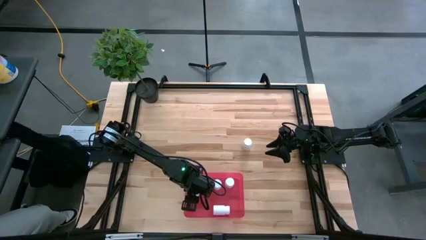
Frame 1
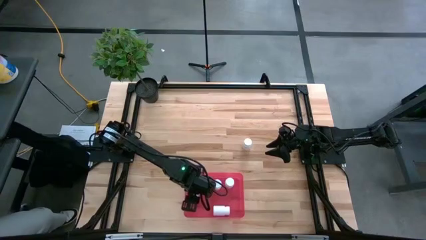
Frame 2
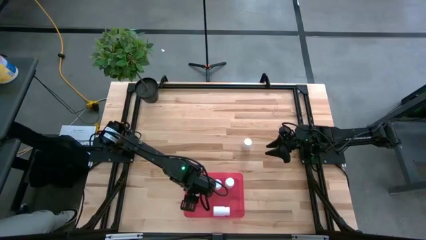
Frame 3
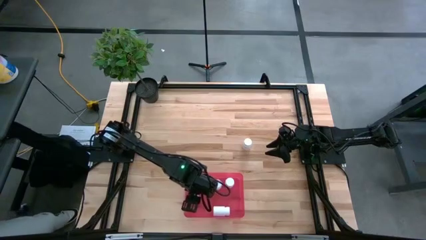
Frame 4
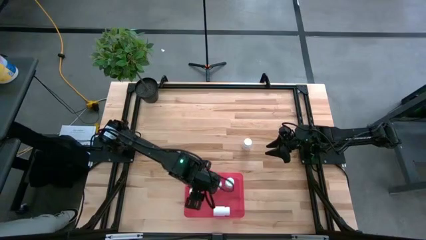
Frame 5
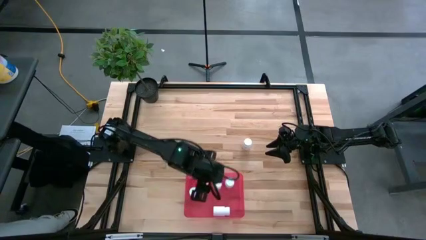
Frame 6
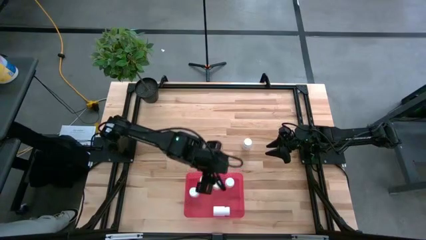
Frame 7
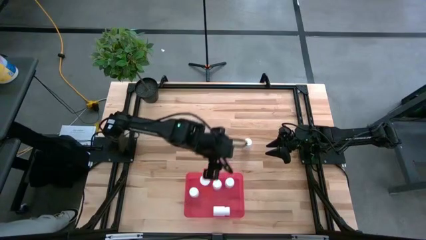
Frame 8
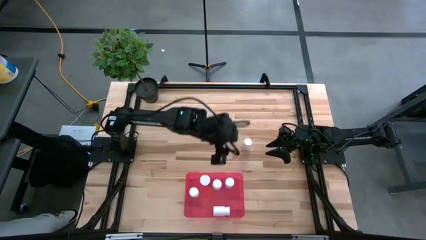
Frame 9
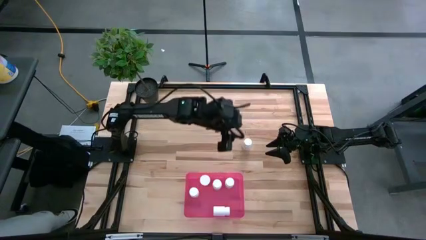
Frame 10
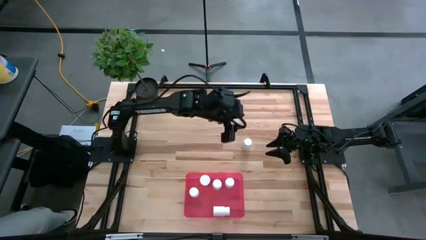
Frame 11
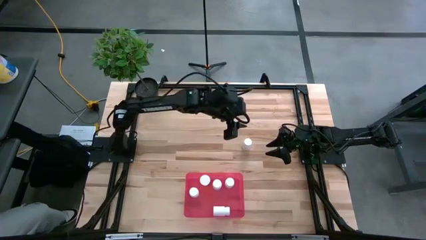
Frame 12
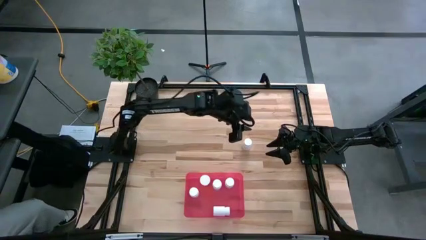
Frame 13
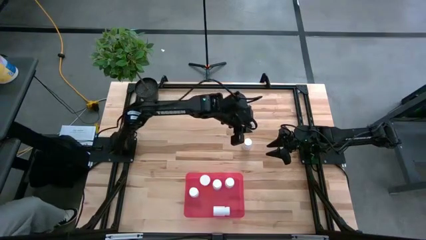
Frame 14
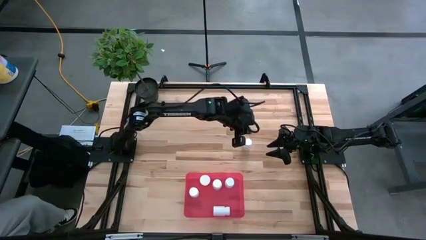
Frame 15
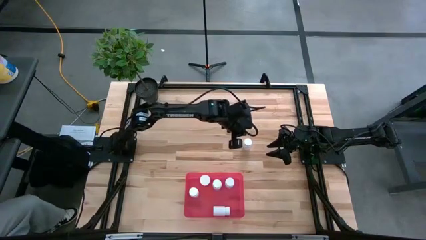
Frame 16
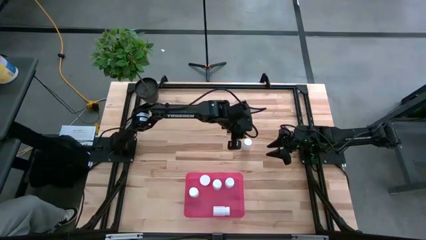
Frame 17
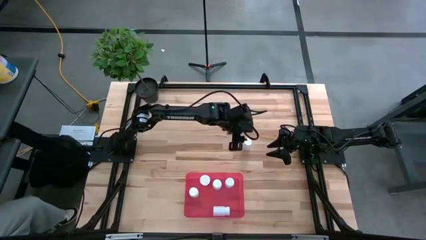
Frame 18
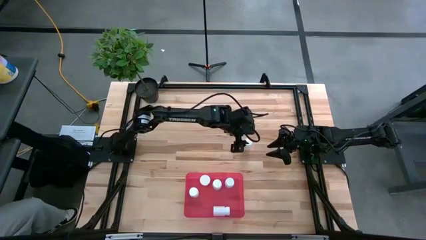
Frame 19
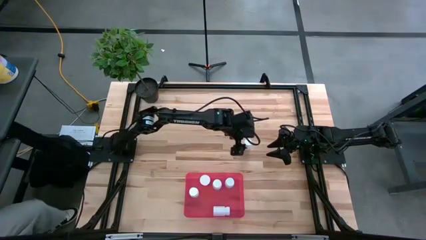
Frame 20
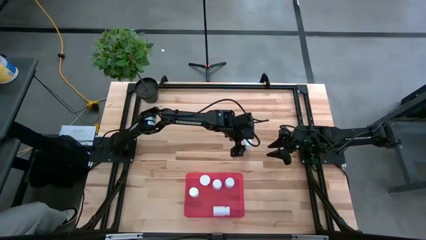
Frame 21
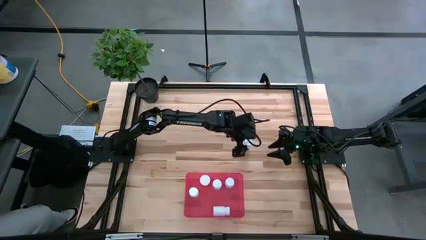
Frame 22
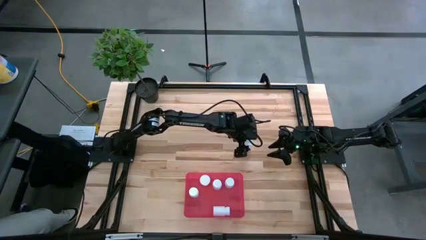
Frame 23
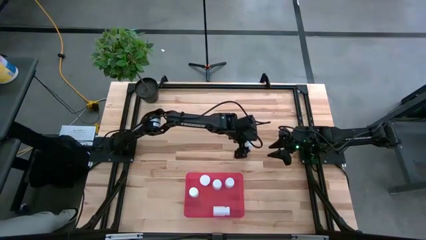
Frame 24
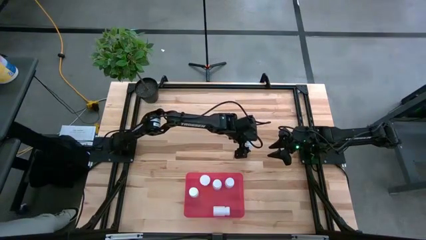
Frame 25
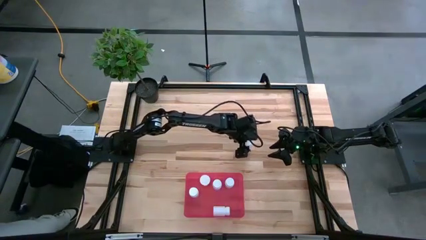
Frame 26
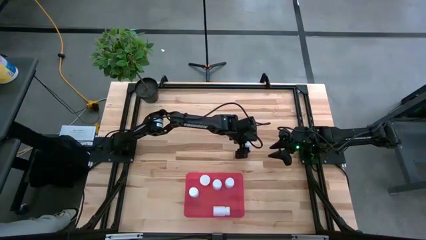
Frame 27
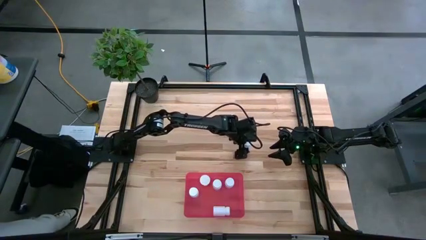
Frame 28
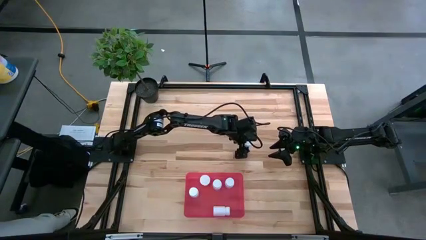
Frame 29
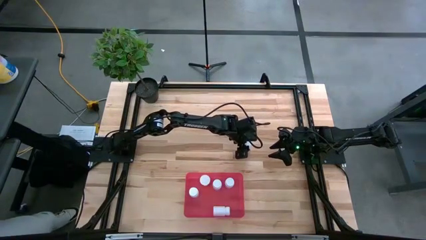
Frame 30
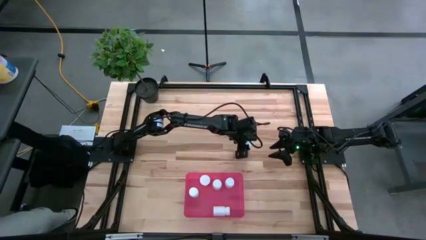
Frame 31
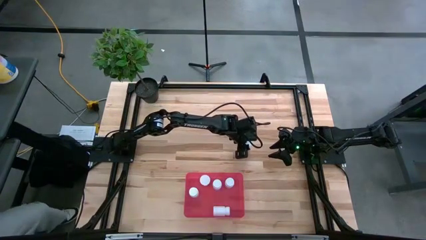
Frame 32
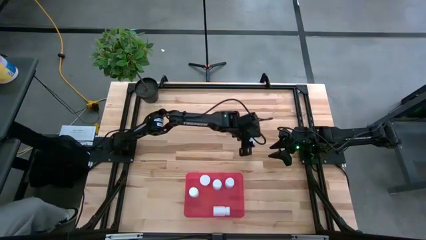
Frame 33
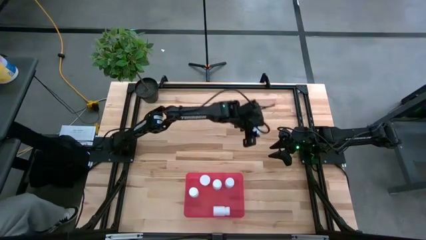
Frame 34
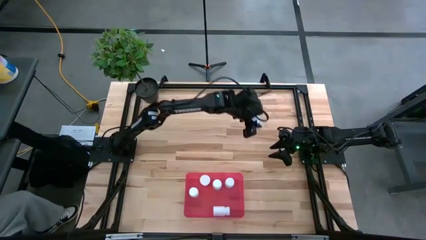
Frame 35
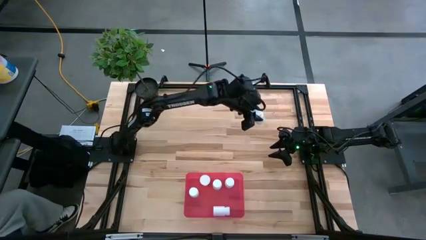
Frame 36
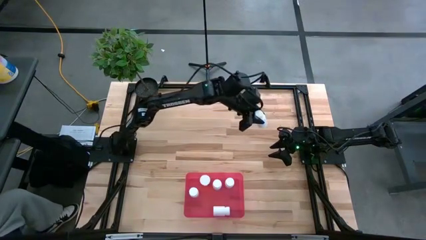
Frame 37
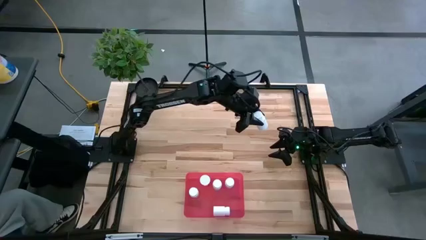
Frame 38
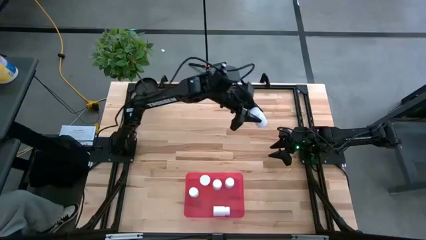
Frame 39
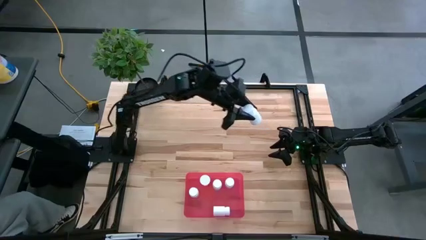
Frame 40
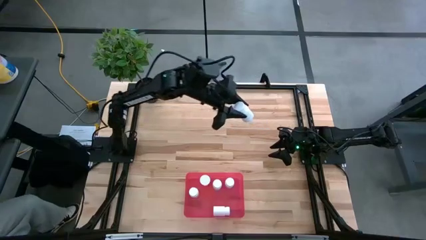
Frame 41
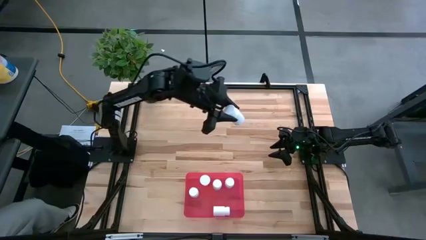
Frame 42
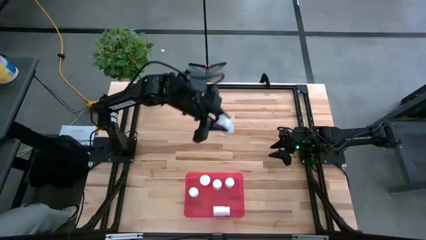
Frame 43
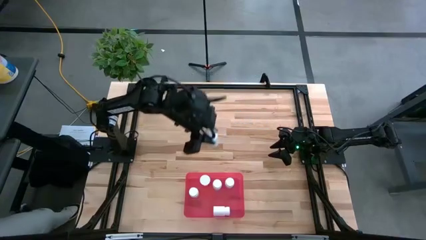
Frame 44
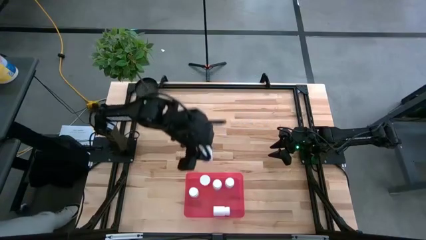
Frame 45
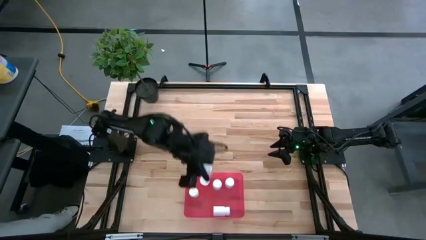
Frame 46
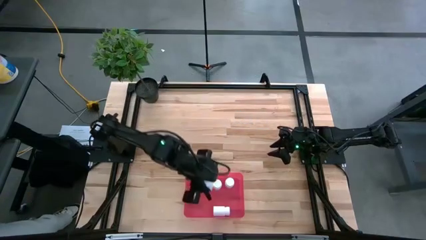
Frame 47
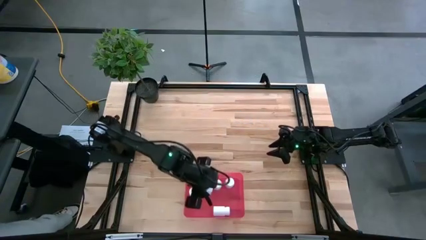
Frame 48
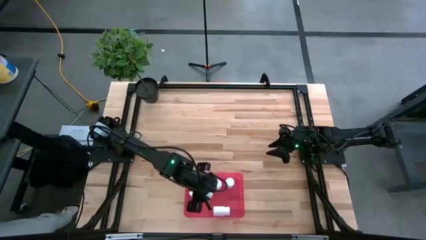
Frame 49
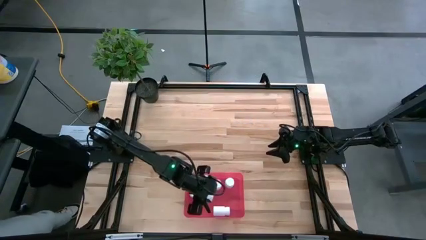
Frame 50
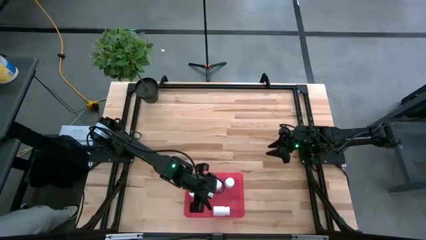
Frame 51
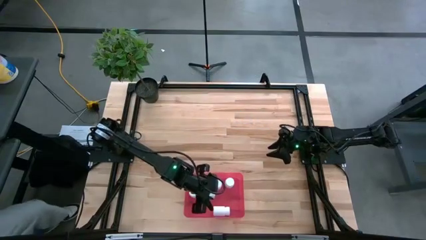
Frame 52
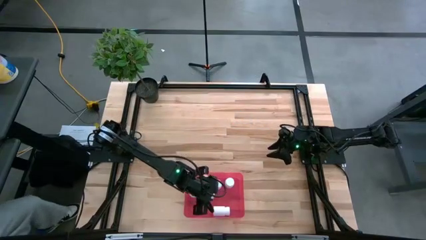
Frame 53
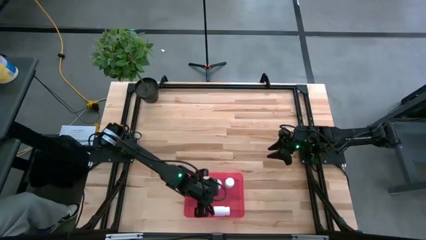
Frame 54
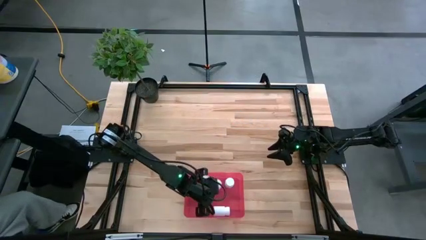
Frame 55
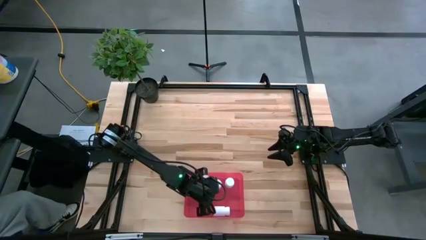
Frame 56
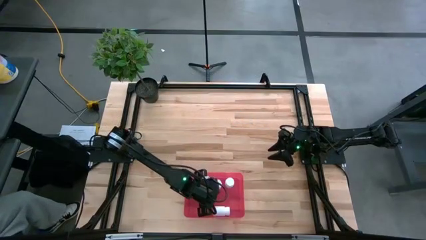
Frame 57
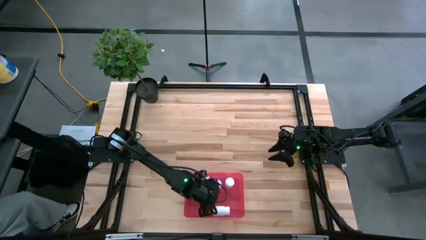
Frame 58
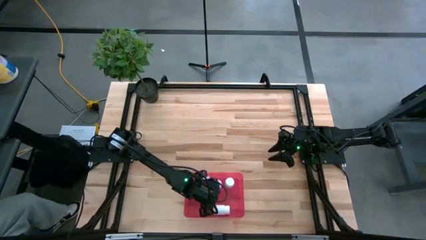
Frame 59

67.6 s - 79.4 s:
Task: Pick and place pill bottles into a basket
Put the white pill bottle into the red bin

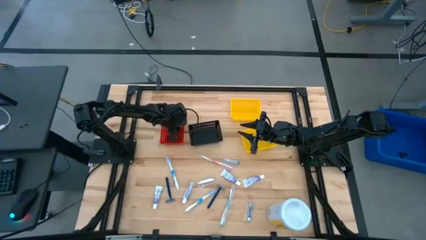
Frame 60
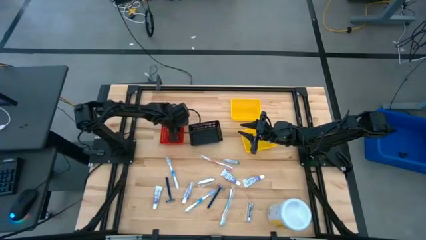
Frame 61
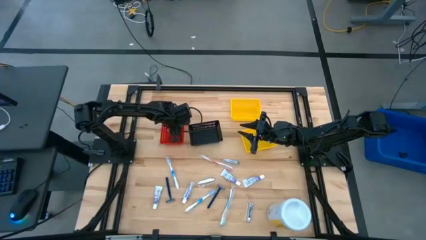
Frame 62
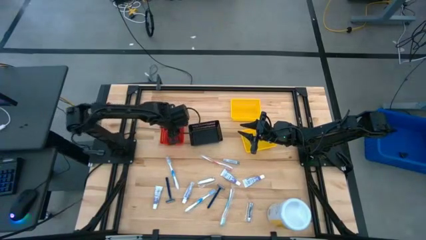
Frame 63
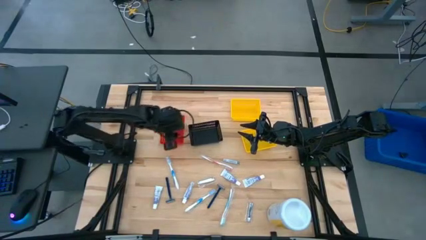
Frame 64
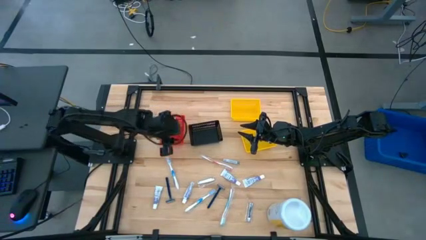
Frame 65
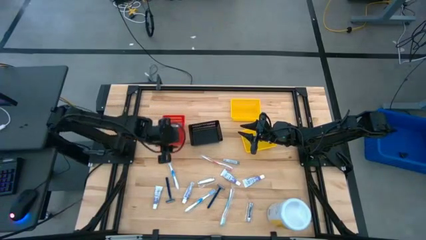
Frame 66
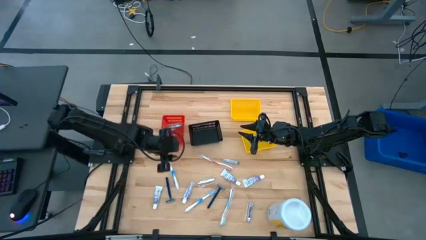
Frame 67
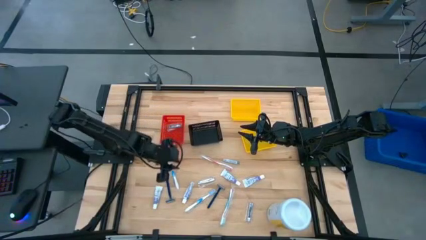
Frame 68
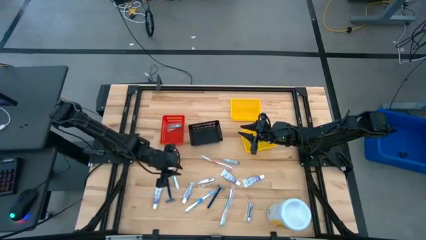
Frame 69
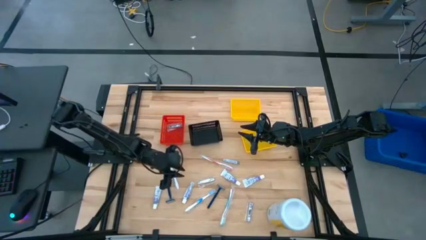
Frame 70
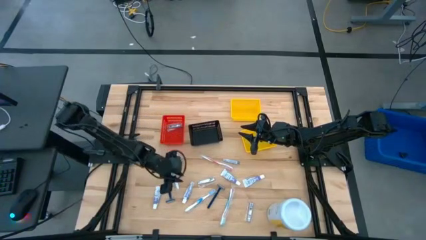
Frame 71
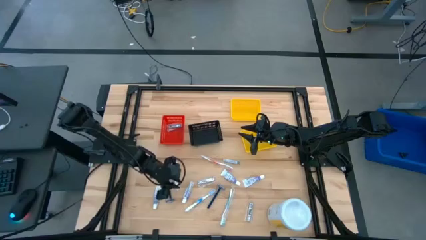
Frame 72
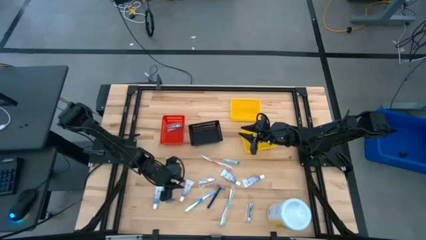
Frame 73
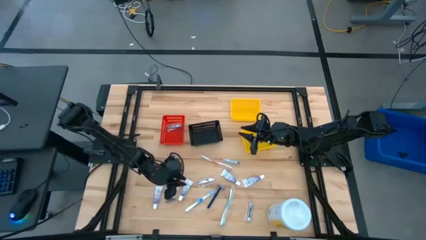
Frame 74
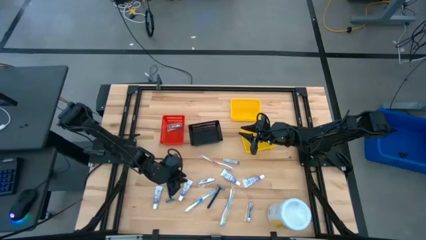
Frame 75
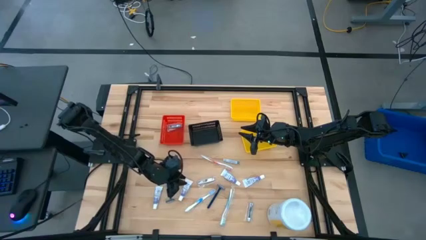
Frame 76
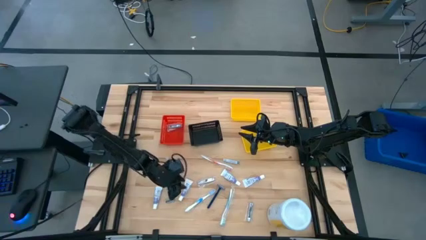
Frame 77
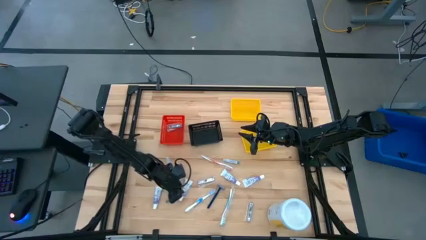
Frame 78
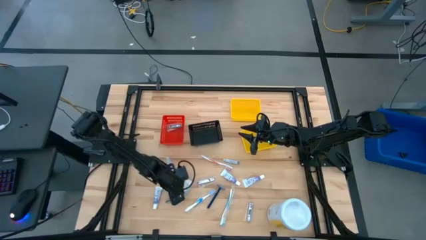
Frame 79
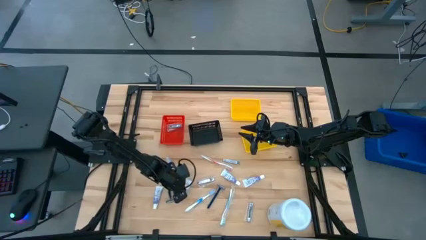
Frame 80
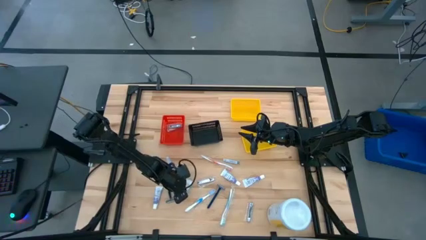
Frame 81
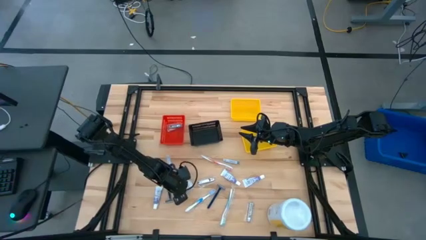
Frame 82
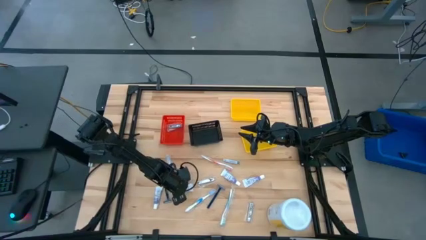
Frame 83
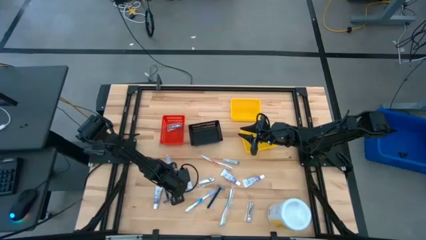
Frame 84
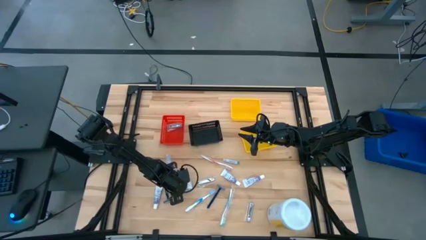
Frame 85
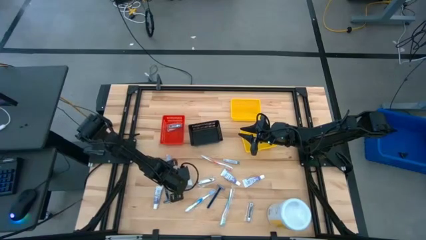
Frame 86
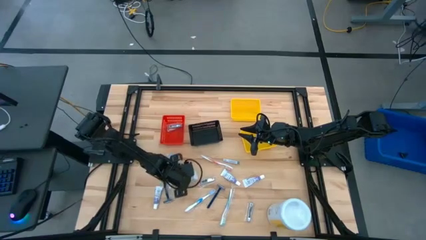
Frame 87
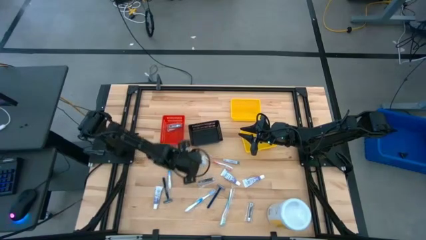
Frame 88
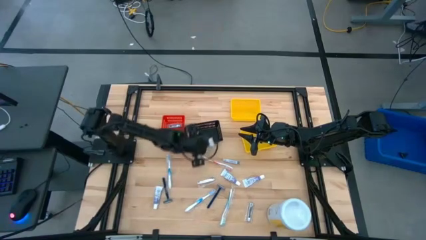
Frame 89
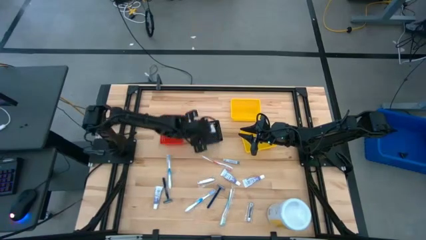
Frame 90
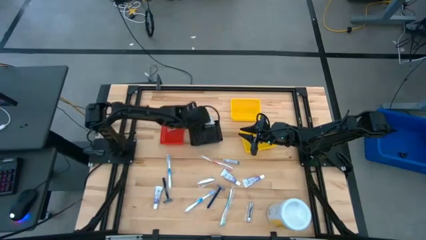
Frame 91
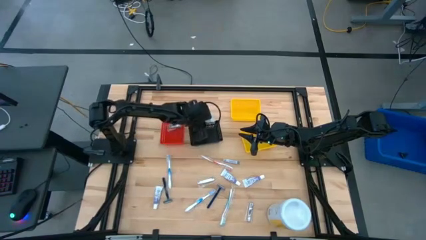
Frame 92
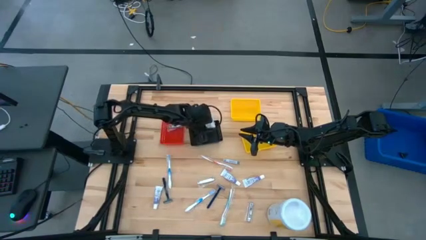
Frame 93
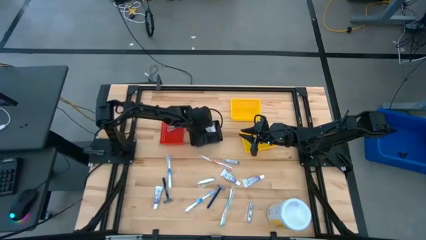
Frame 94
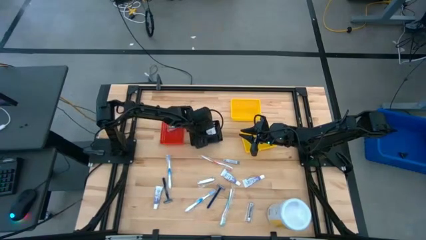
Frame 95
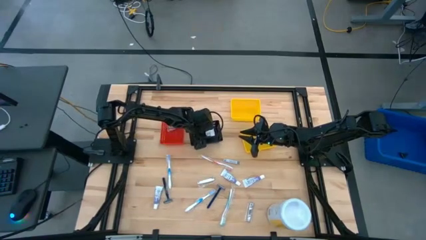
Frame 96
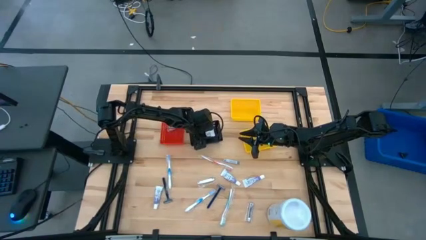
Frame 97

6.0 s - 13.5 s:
Task: Pick & Place Travel size toiletries
Put the white toothpaste into the black bin
